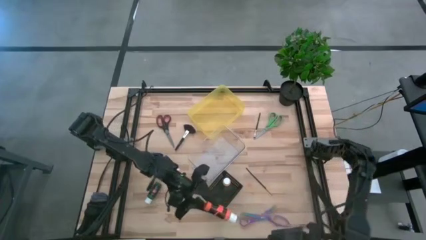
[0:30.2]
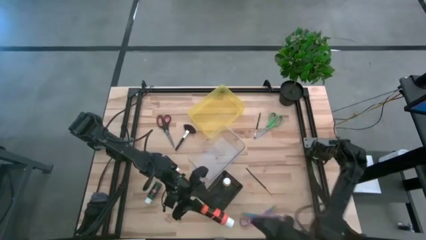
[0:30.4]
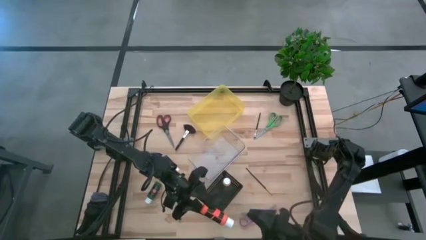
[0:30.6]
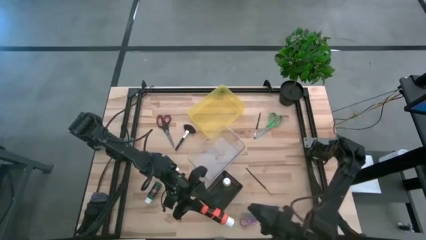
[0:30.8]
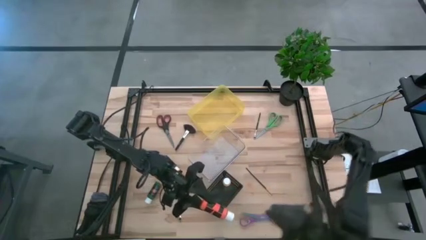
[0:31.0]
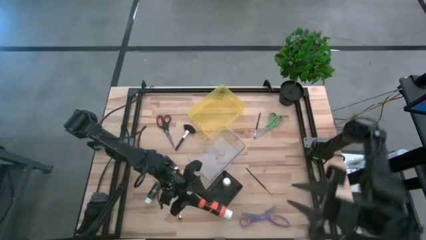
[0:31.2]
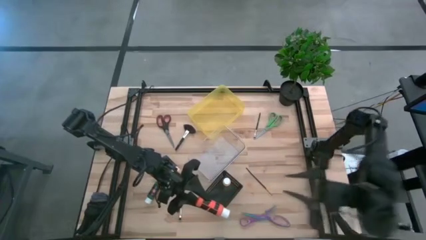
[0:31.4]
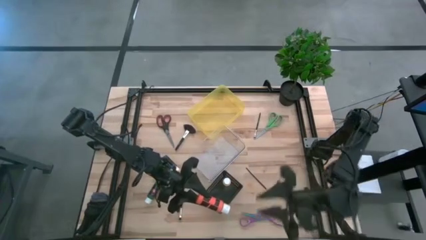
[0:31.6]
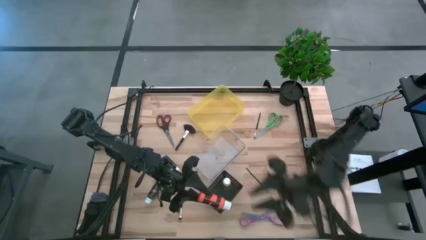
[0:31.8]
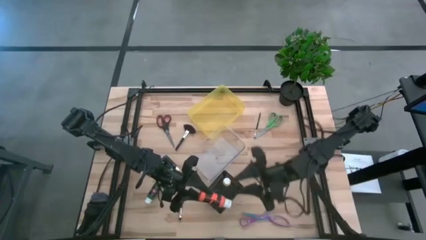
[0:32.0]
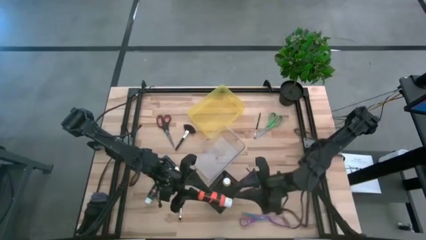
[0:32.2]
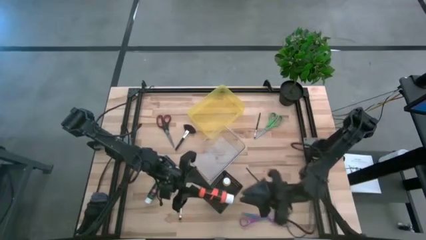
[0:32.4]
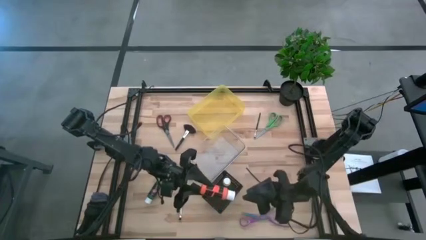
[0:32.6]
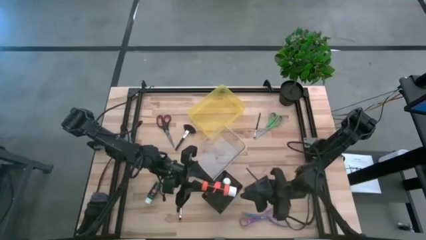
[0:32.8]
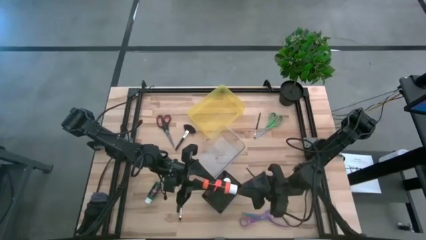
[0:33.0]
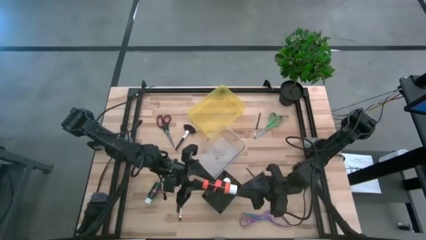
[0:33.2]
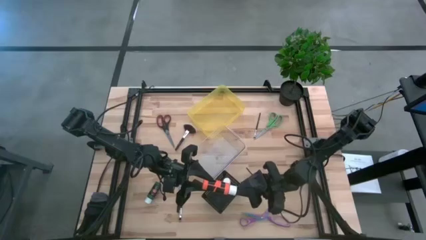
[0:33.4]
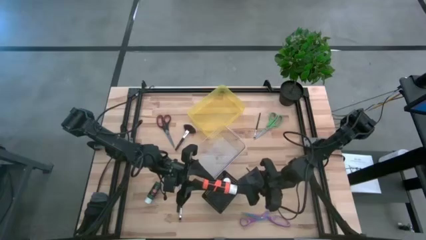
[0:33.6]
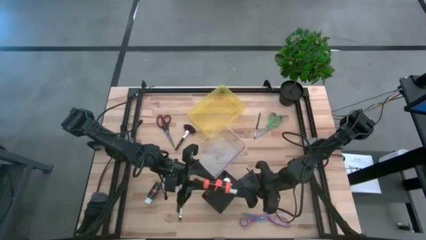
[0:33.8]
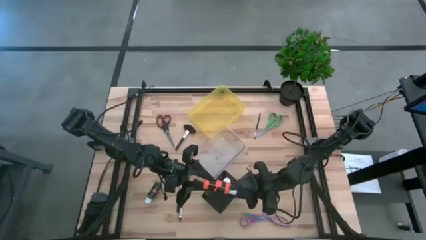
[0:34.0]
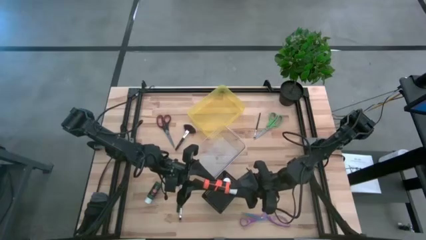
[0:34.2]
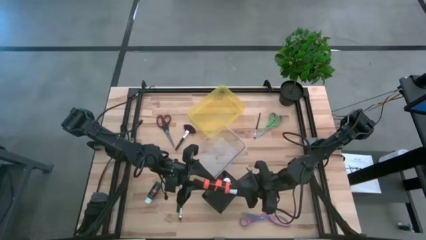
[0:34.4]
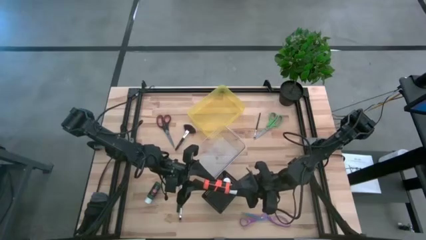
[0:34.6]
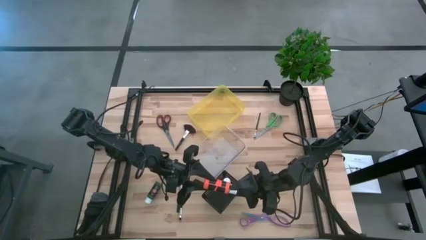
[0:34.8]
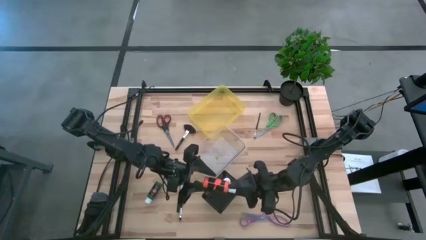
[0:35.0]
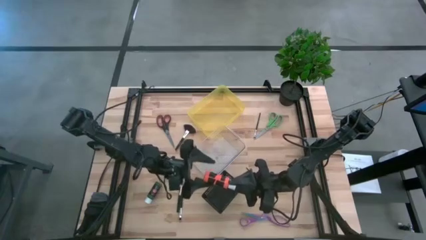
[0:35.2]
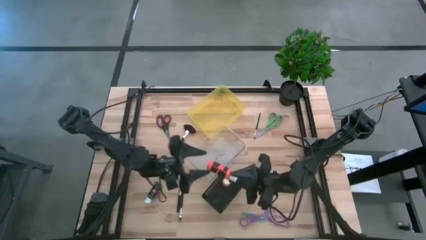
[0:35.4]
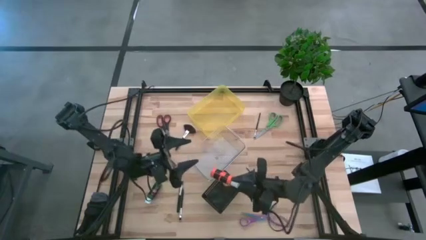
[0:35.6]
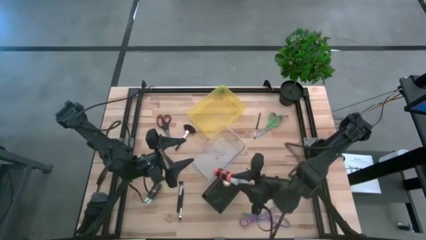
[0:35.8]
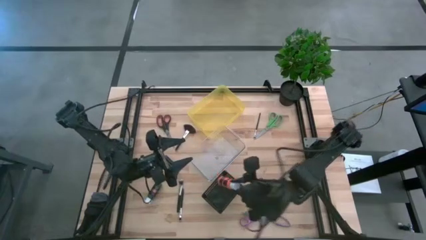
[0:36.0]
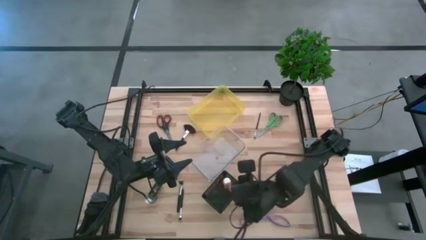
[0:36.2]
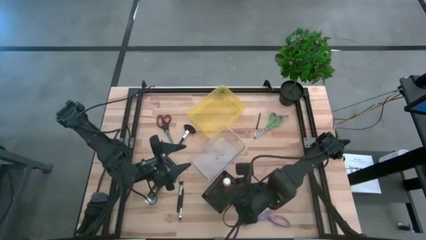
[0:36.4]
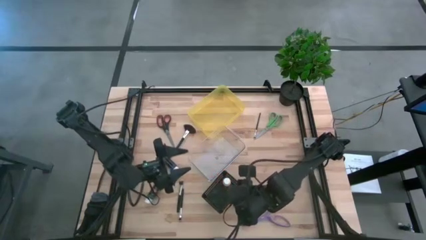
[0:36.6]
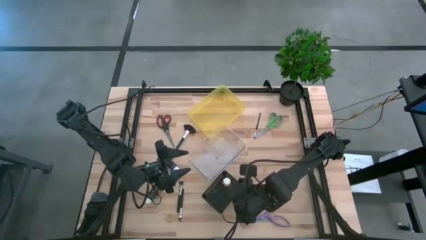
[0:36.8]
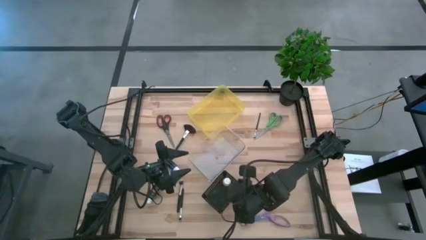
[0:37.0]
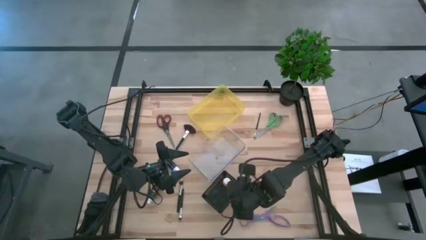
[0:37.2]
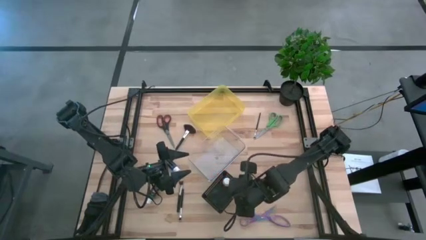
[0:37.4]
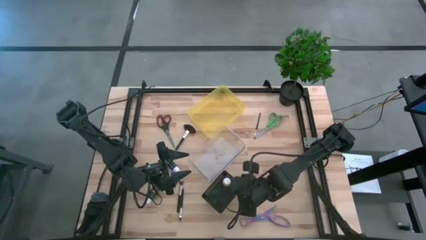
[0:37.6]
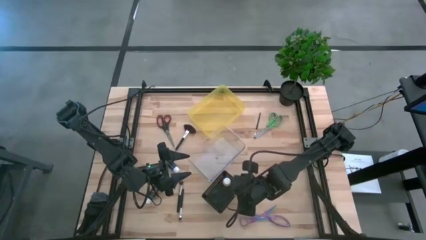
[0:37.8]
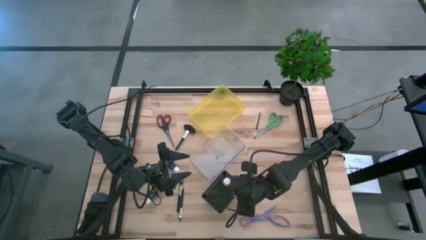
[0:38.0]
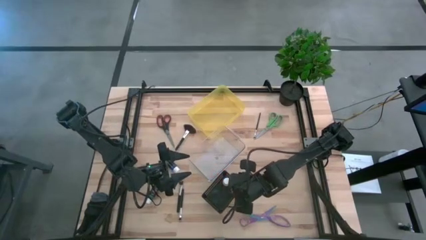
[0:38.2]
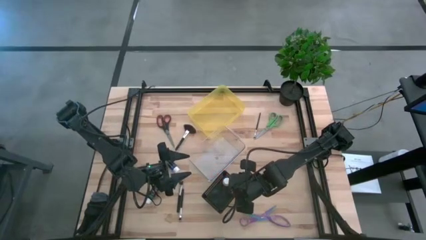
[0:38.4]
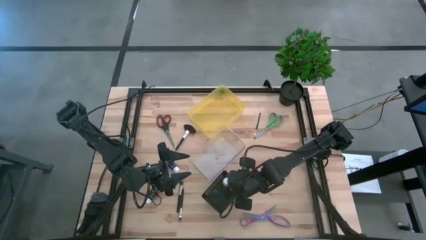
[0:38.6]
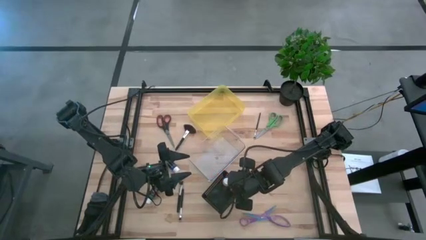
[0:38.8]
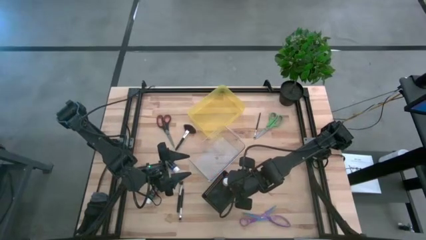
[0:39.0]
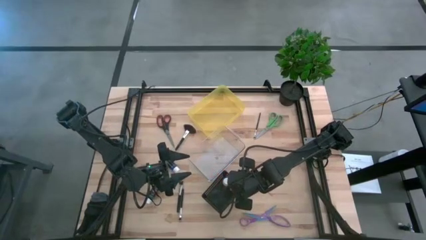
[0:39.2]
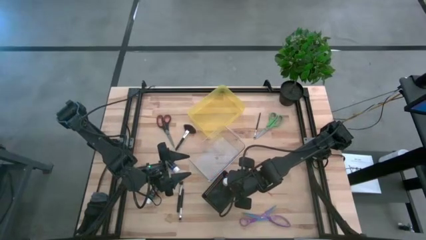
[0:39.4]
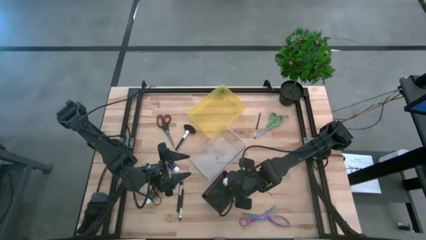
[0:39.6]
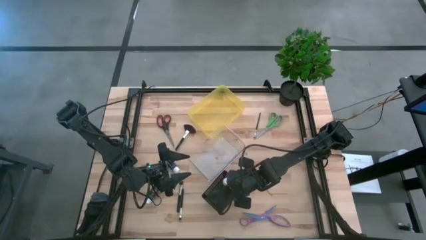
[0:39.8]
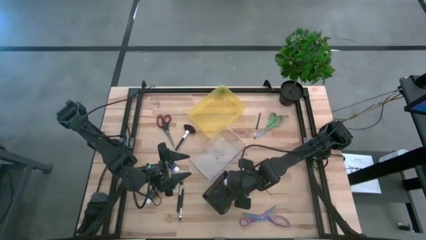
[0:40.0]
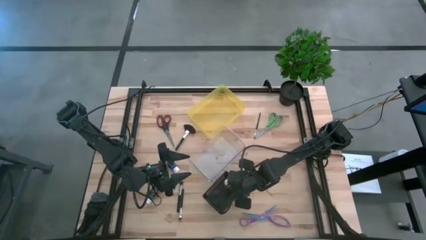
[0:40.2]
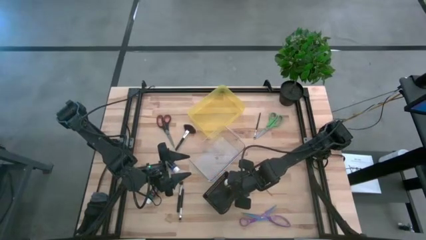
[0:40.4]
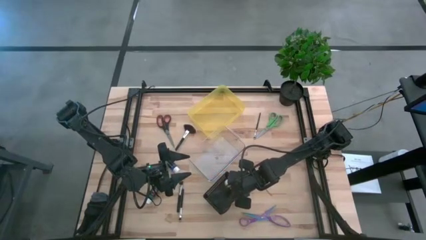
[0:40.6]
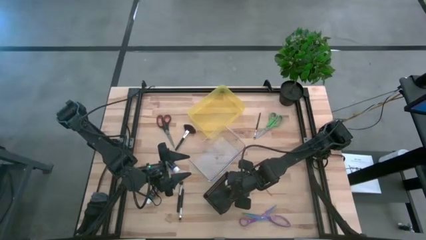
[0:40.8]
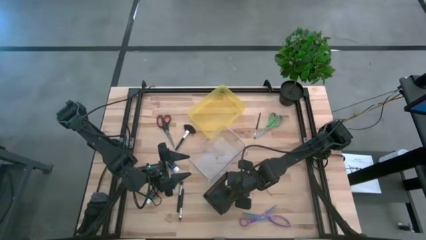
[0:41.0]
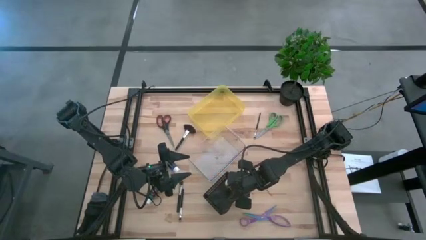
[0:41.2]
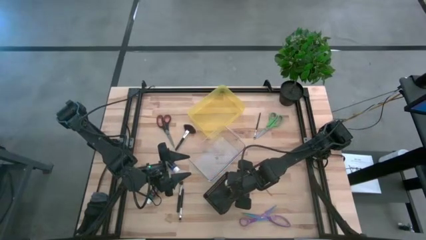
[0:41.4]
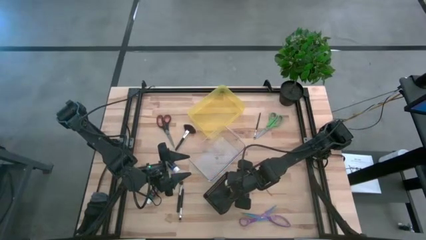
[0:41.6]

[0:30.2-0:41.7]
Task: Pick & Place Paint Supplies
Put the orange paint bottle into the black bin
